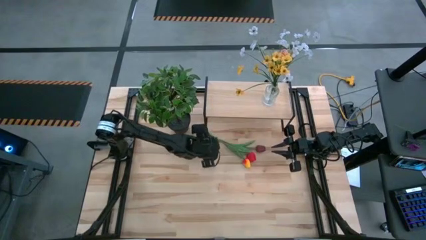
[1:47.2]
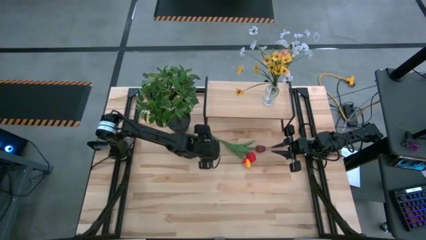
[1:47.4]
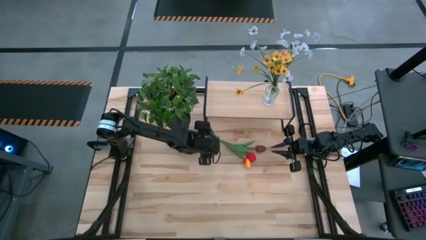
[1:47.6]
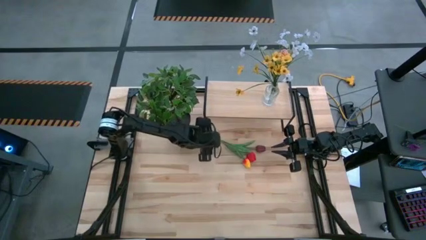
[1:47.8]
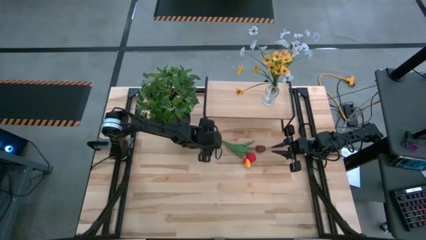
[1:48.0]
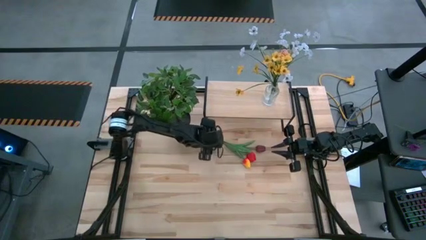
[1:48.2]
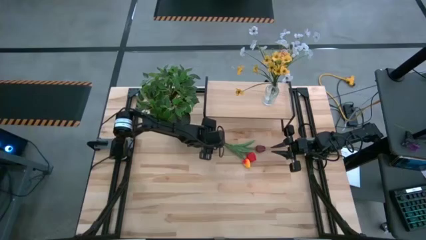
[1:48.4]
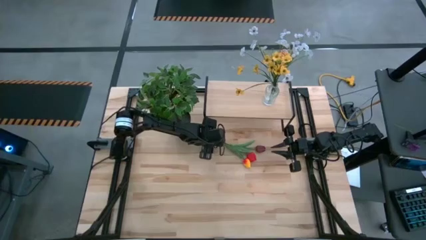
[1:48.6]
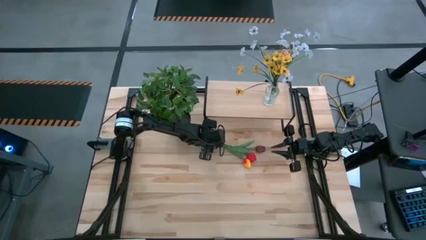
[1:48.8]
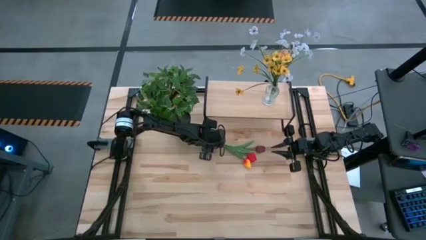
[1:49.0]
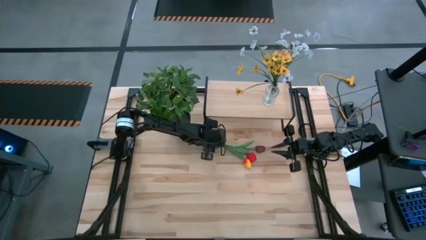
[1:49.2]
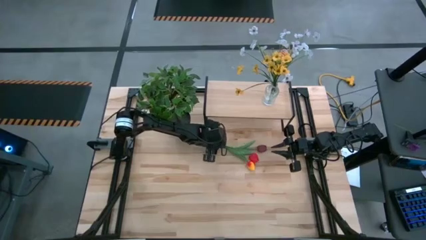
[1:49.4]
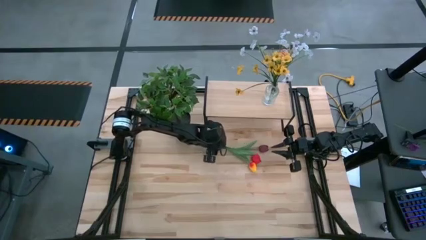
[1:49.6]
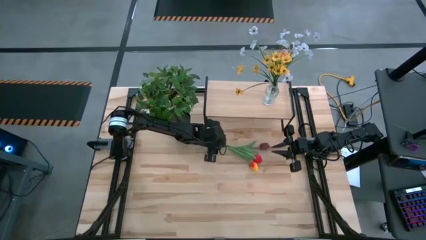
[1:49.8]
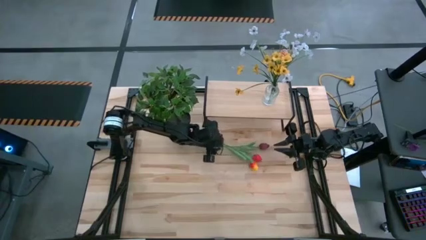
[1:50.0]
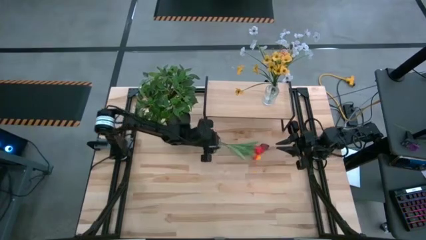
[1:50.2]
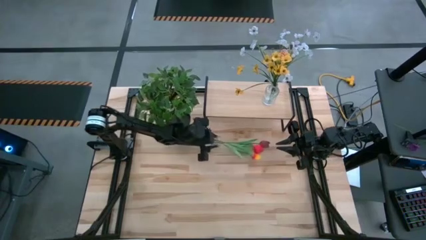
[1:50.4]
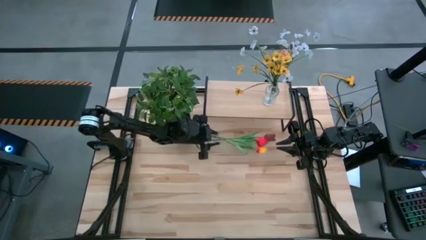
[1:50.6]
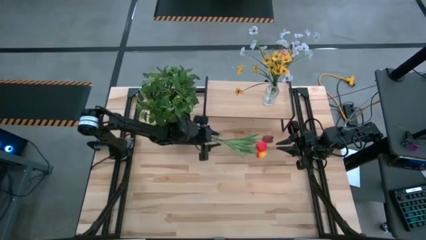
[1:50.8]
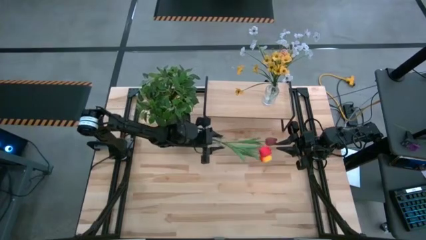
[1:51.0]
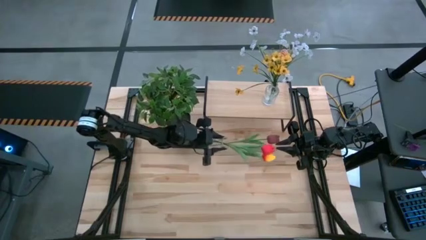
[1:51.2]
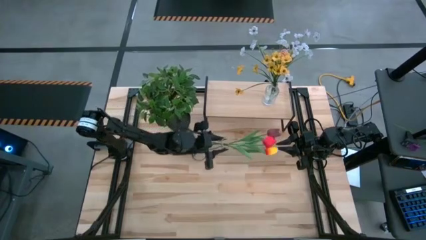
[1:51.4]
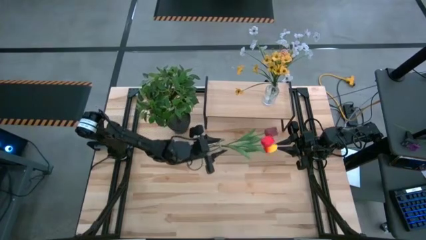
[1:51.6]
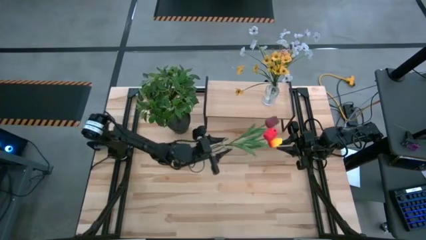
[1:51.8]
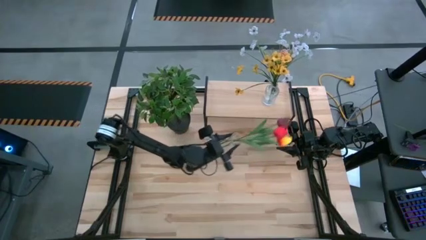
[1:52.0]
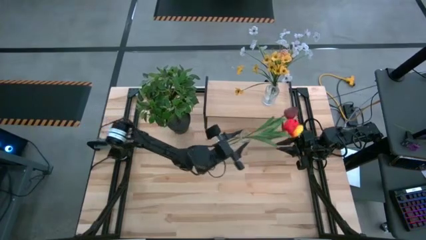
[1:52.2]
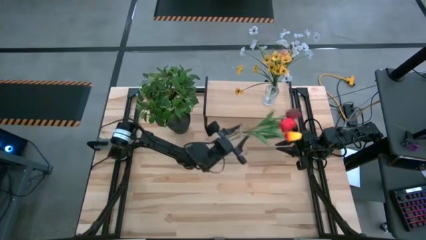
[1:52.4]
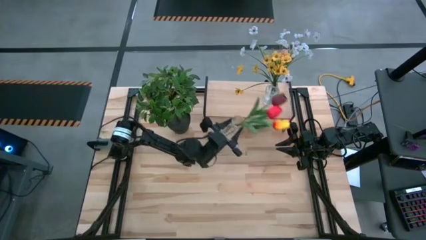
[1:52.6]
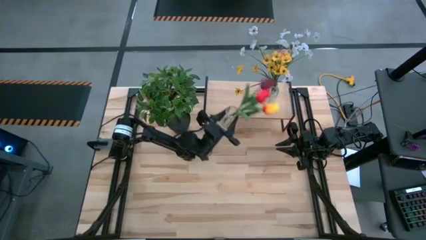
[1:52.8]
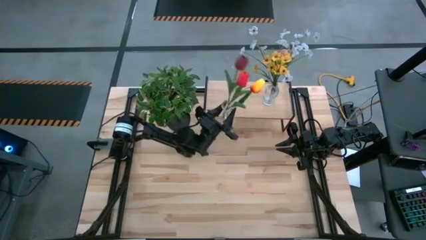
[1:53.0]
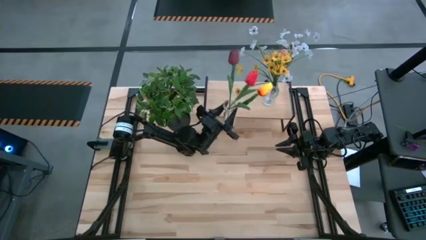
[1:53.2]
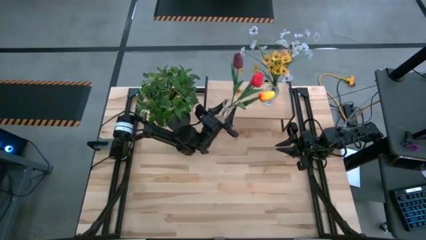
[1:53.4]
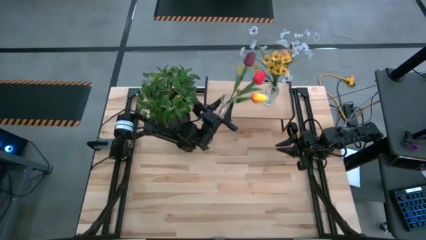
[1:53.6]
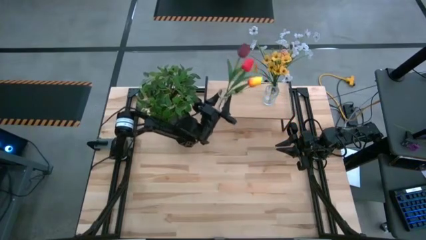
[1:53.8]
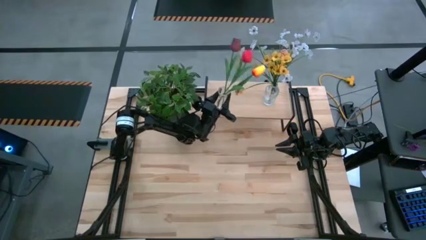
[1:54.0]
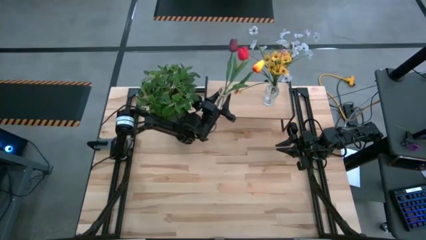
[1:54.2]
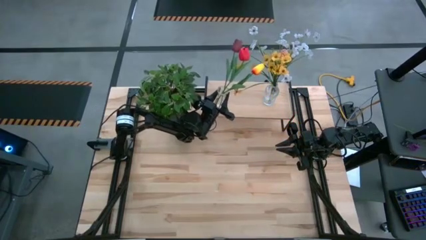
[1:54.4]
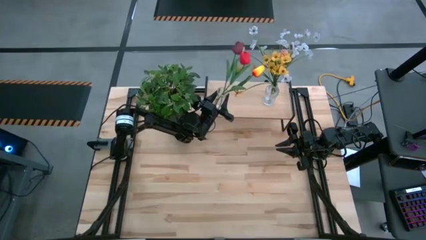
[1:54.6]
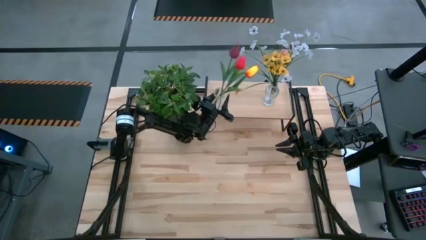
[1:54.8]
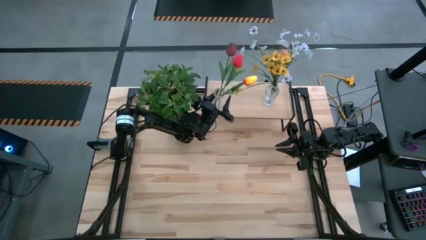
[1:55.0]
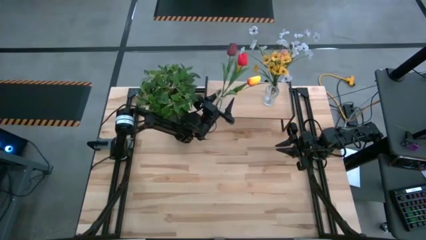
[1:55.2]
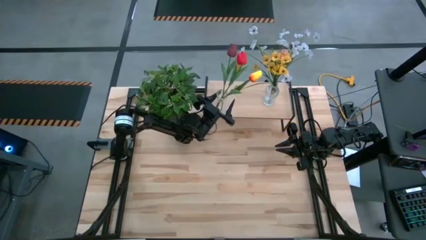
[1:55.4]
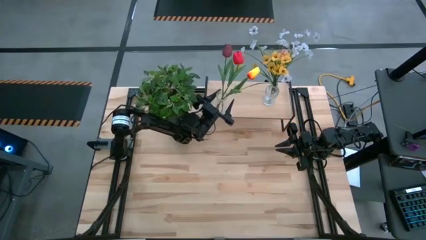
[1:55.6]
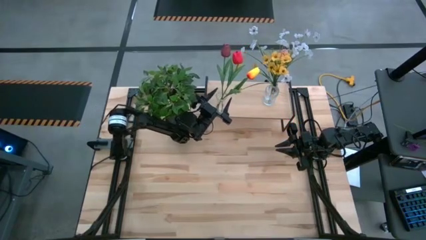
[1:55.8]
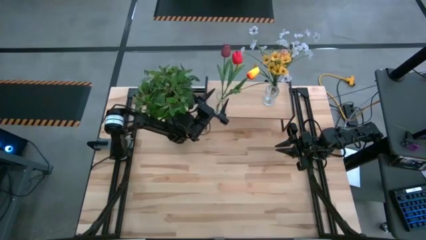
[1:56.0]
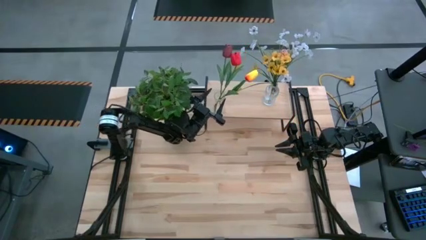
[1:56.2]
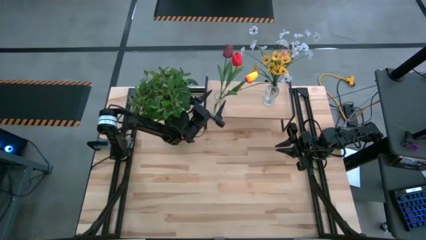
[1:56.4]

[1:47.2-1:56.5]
Task: Pick and place flowers into a vace then onto a shelf
Put the transparent flower vase on the shelf

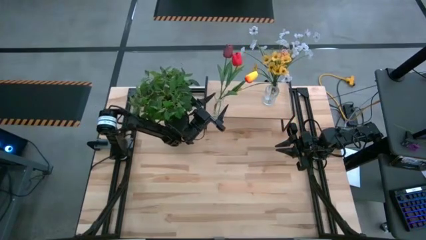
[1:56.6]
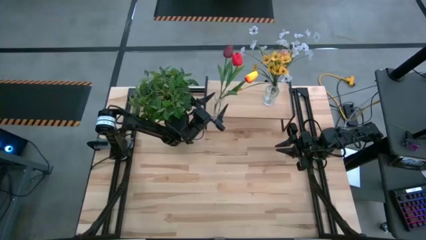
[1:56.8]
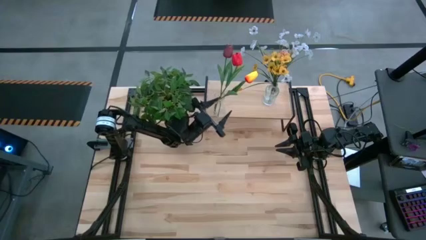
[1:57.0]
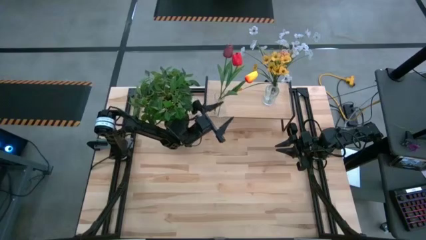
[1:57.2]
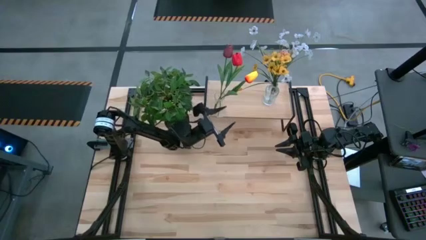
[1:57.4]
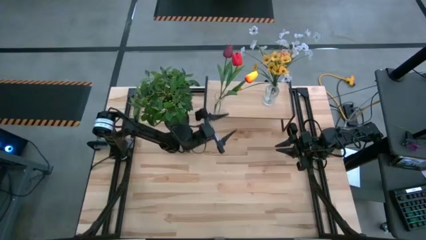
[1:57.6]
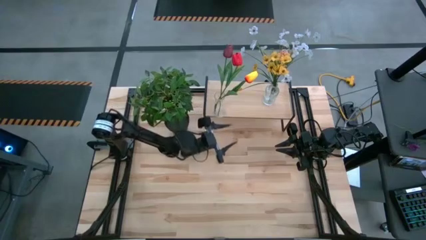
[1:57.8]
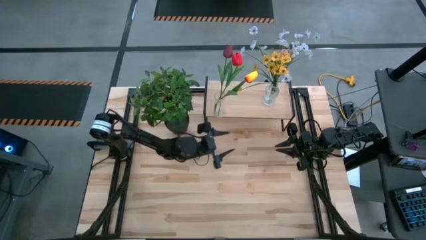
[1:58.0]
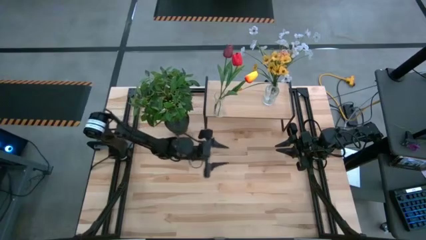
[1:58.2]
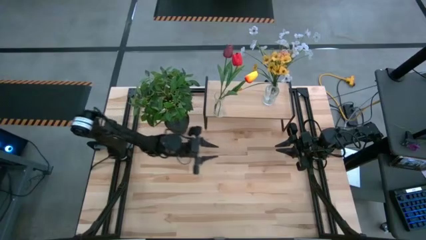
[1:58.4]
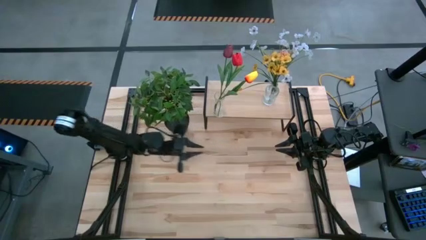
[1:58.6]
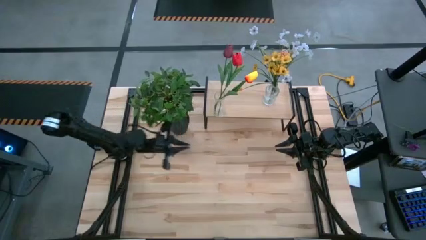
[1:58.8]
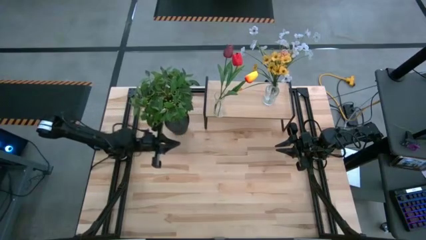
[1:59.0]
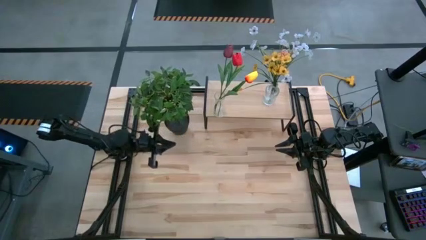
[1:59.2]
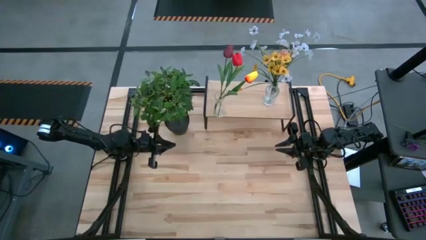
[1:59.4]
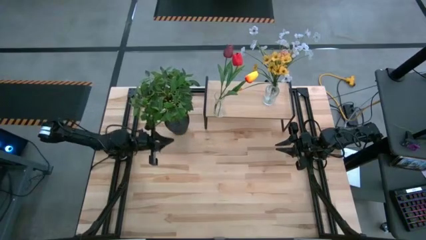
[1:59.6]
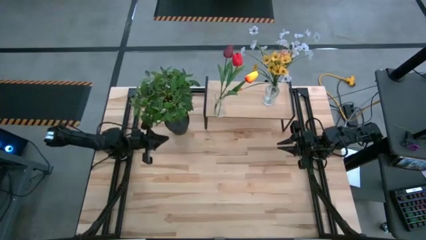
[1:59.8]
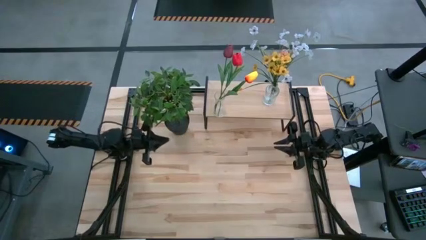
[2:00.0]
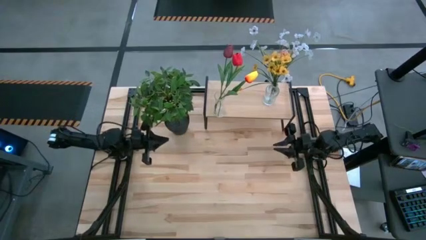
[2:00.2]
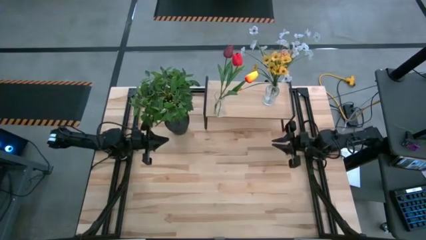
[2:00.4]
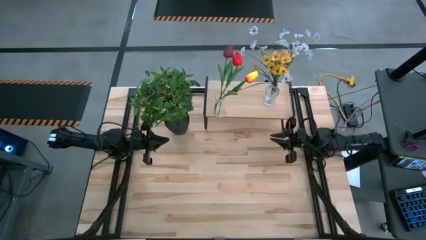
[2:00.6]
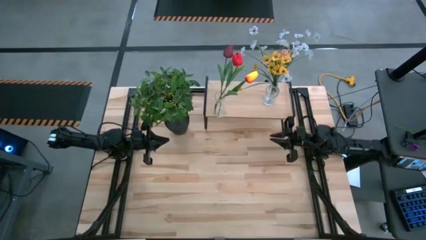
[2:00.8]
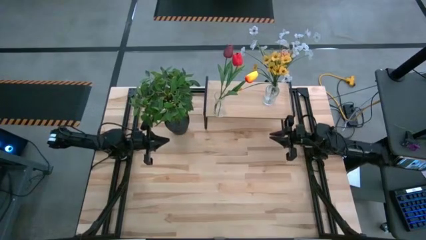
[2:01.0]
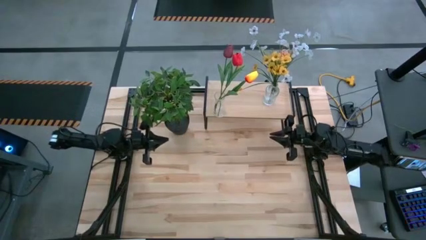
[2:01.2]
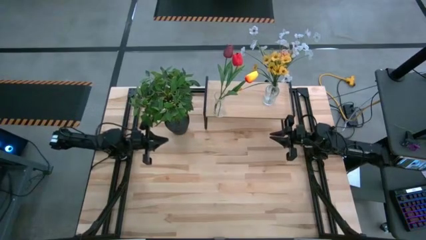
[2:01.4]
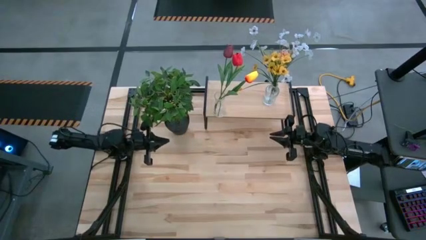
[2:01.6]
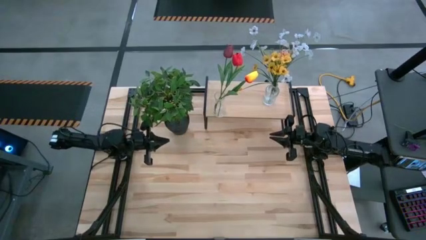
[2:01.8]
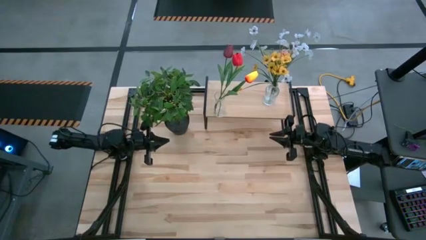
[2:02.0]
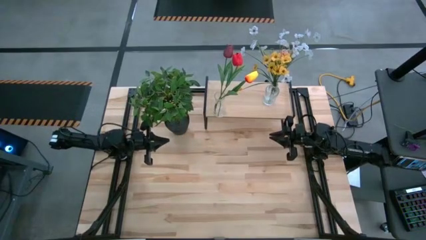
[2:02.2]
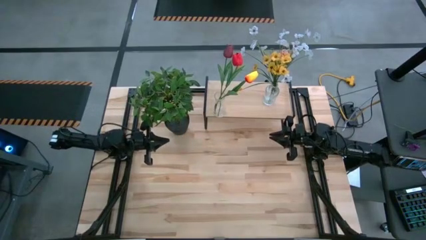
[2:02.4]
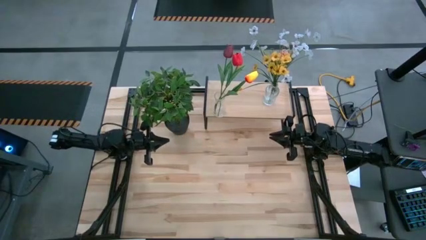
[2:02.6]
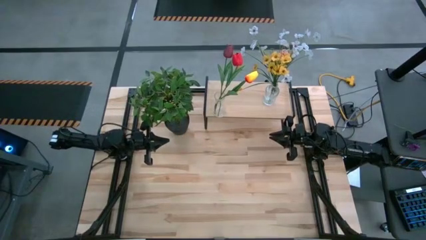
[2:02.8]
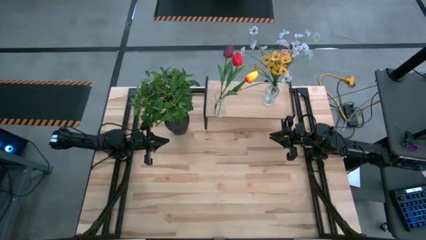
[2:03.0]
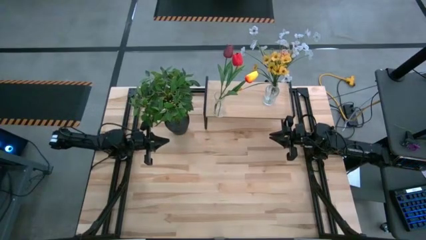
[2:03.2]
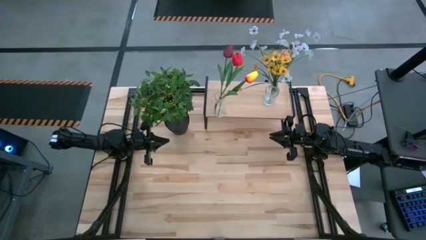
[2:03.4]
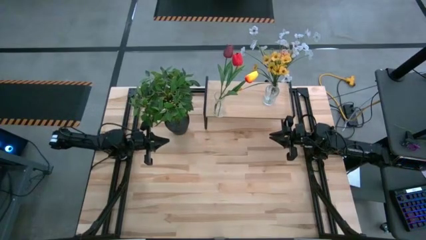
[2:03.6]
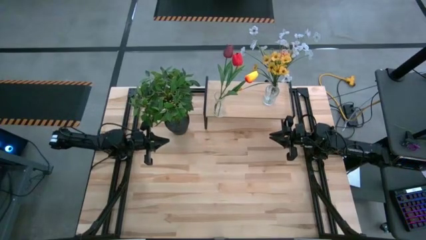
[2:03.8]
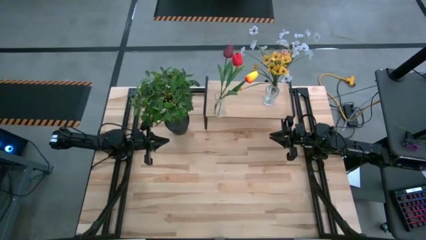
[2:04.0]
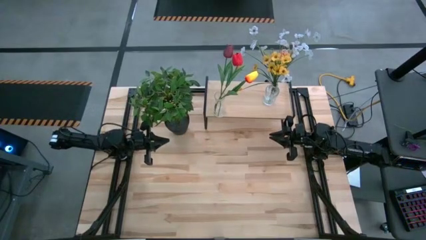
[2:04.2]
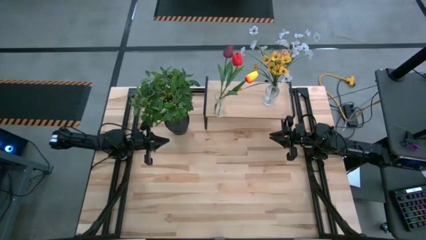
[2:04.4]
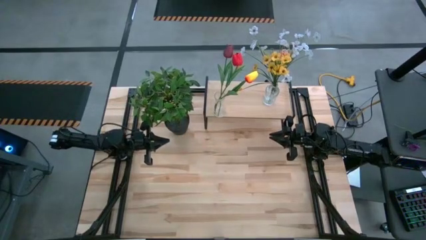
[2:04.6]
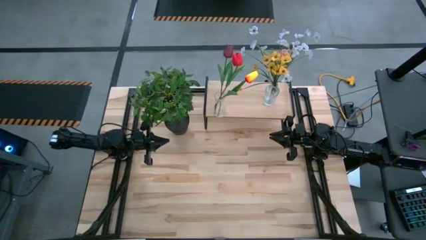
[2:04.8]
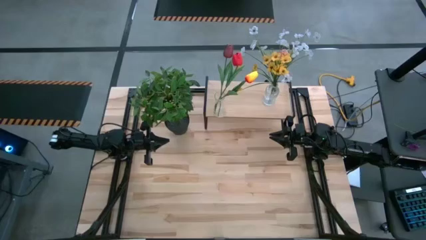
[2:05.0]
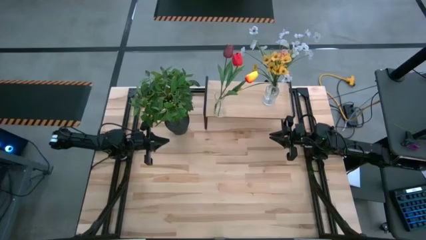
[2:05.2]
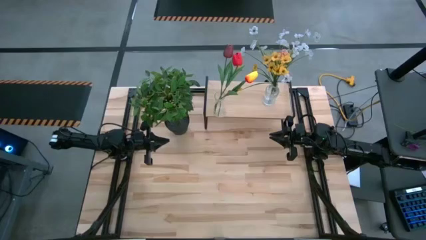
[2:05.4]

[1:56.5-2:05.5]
Return to Home Position
